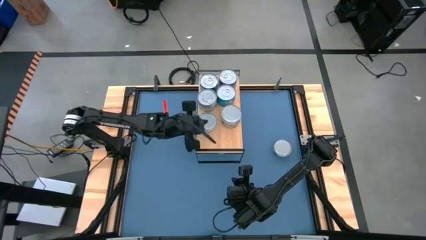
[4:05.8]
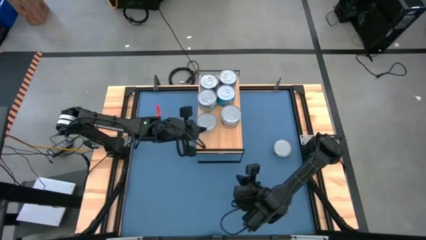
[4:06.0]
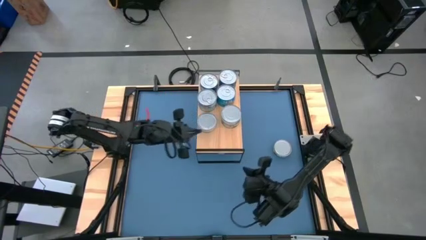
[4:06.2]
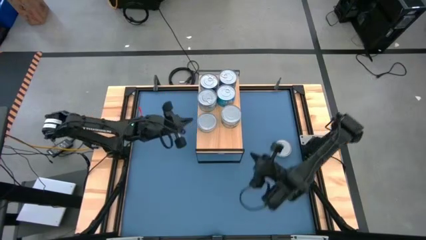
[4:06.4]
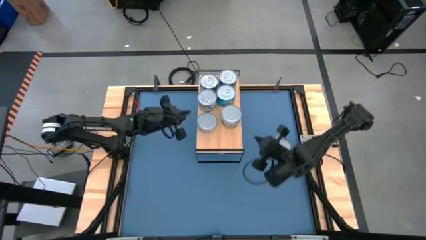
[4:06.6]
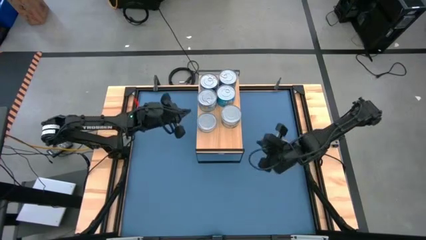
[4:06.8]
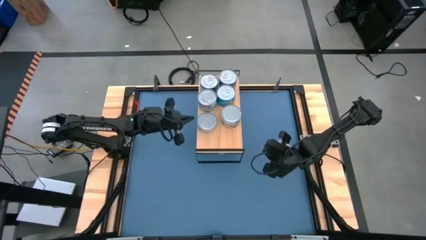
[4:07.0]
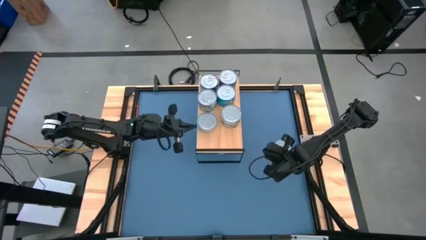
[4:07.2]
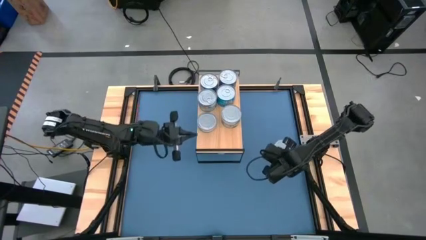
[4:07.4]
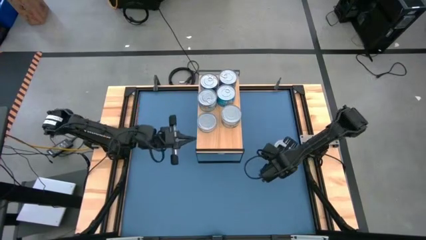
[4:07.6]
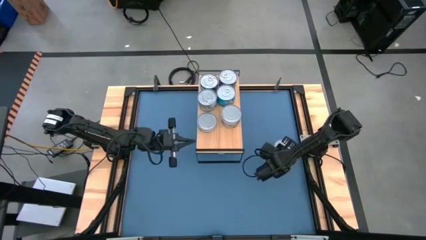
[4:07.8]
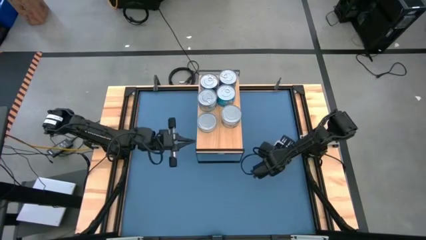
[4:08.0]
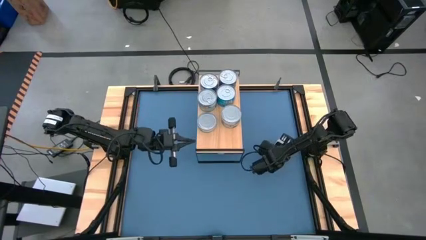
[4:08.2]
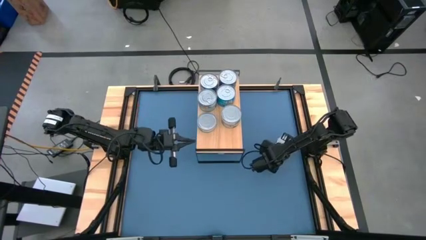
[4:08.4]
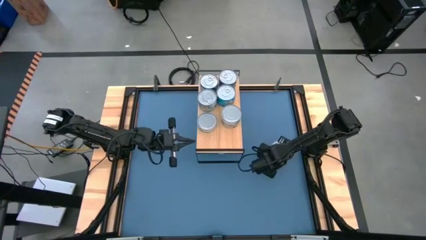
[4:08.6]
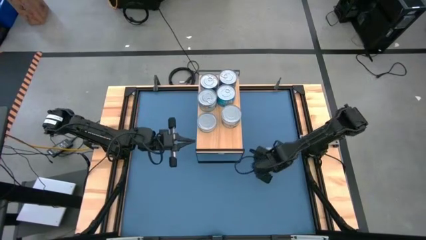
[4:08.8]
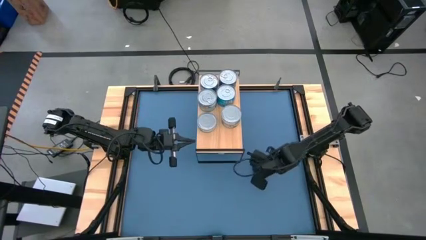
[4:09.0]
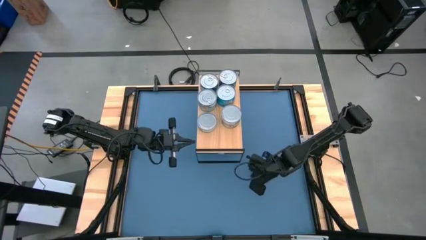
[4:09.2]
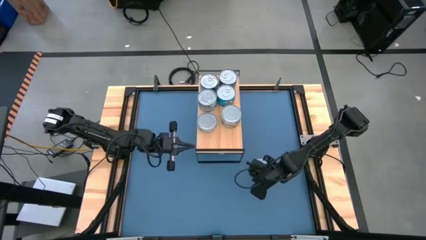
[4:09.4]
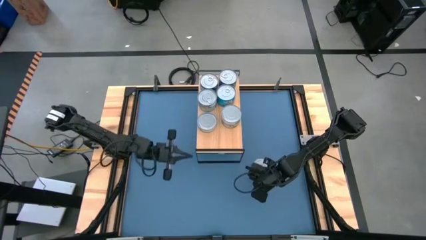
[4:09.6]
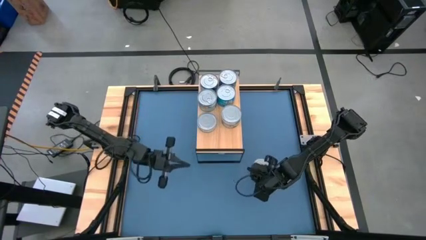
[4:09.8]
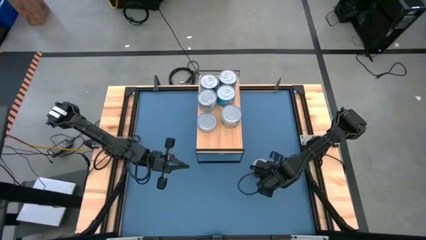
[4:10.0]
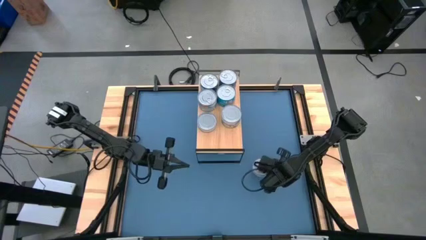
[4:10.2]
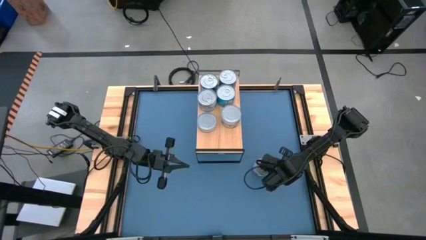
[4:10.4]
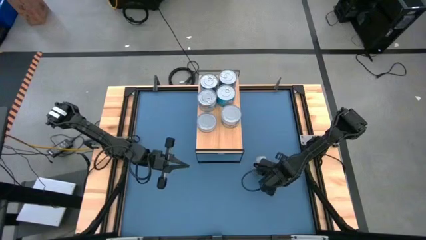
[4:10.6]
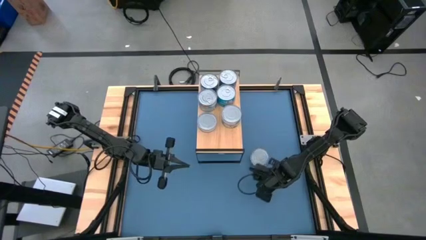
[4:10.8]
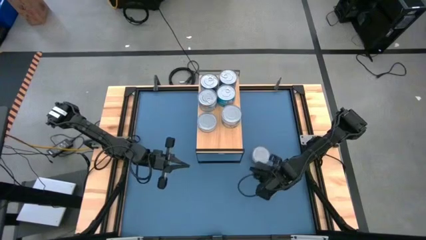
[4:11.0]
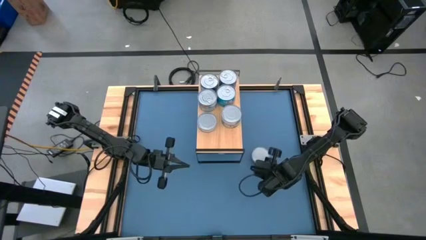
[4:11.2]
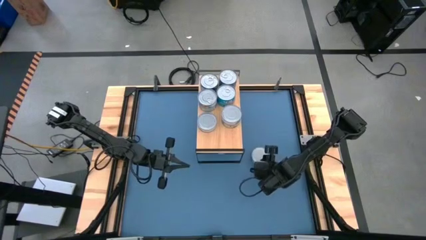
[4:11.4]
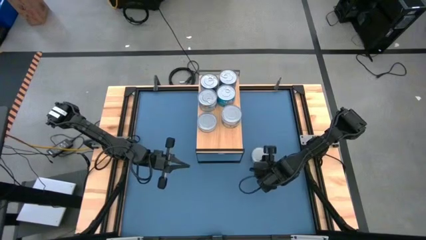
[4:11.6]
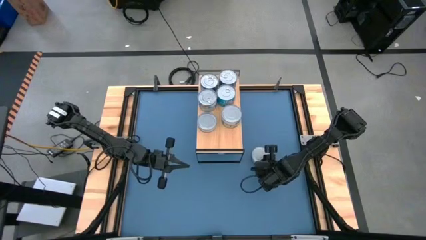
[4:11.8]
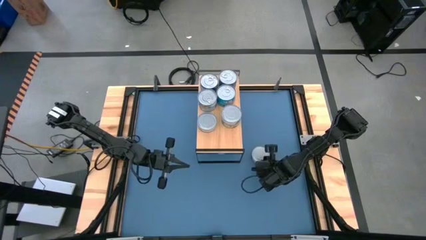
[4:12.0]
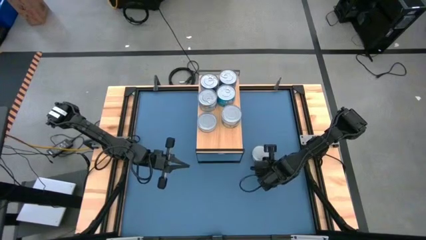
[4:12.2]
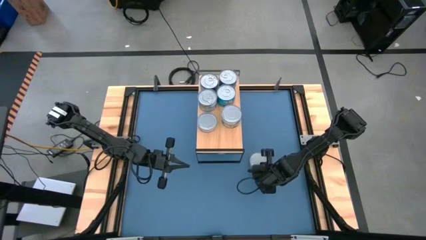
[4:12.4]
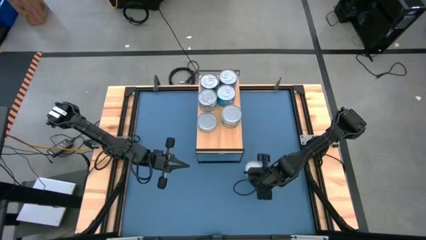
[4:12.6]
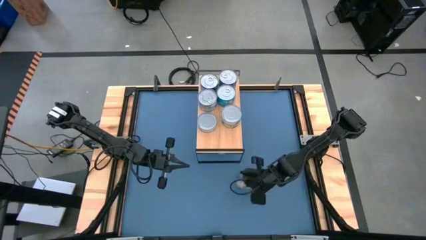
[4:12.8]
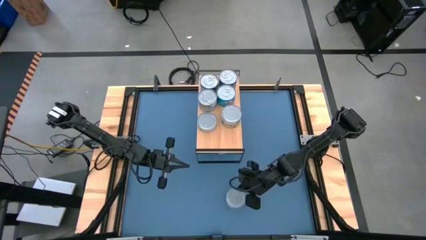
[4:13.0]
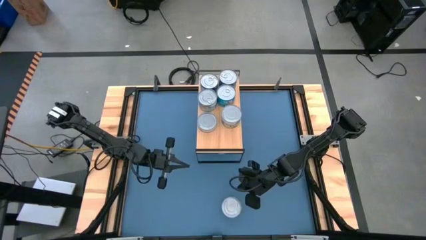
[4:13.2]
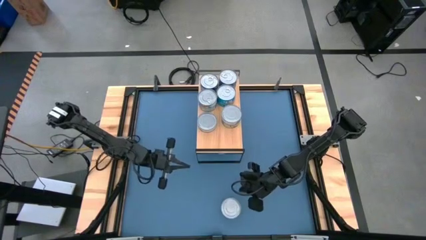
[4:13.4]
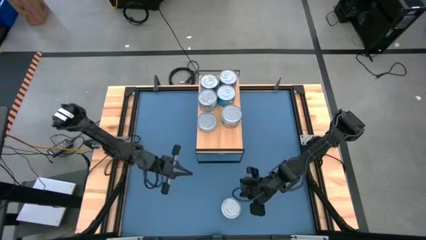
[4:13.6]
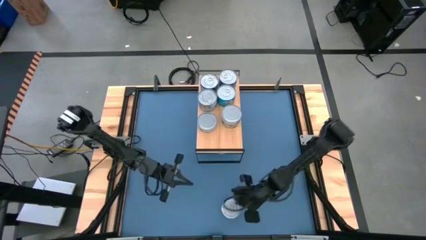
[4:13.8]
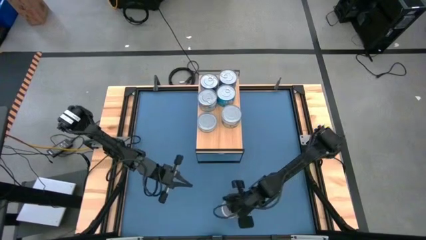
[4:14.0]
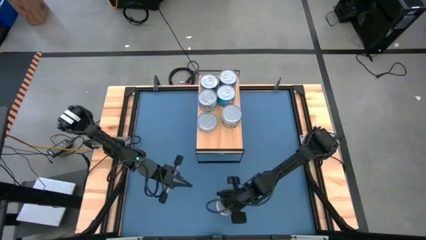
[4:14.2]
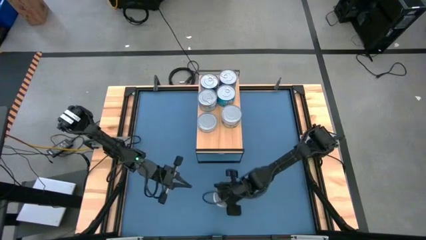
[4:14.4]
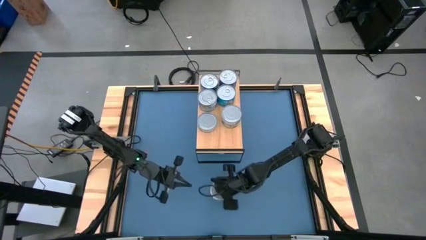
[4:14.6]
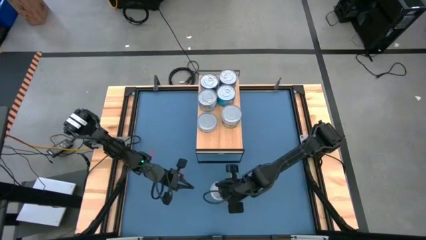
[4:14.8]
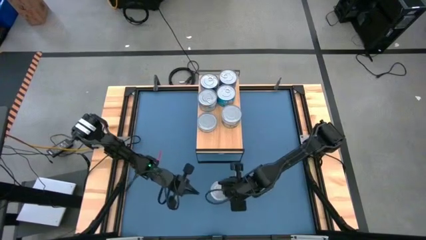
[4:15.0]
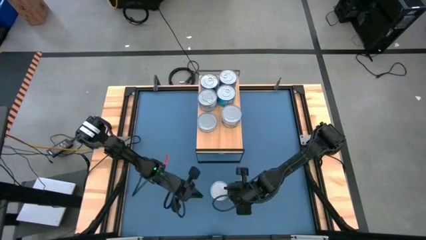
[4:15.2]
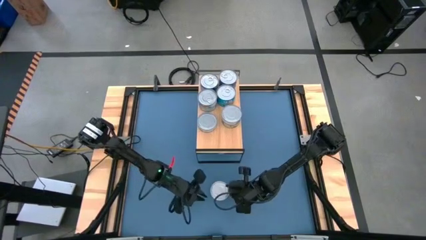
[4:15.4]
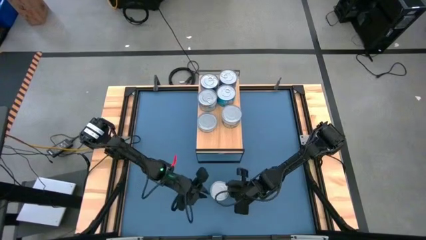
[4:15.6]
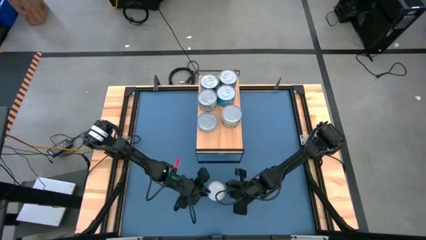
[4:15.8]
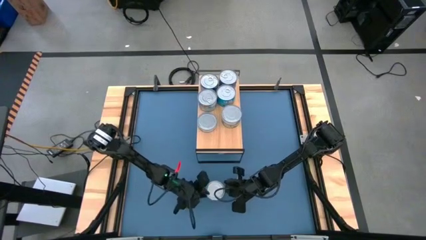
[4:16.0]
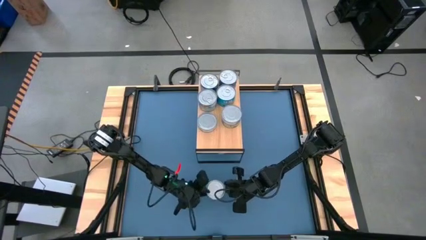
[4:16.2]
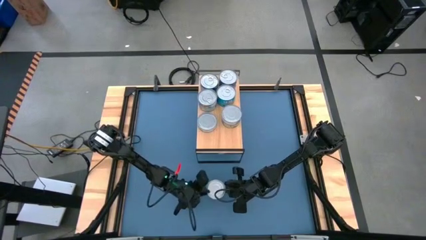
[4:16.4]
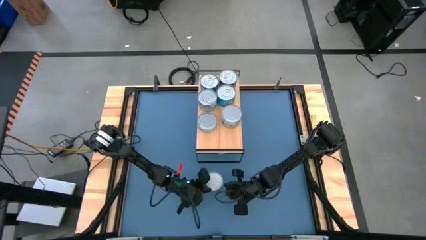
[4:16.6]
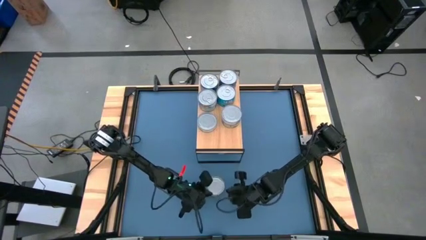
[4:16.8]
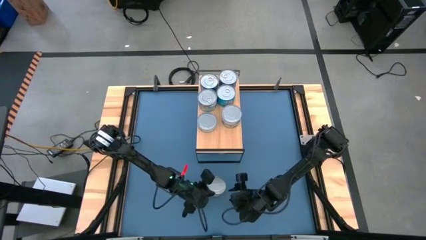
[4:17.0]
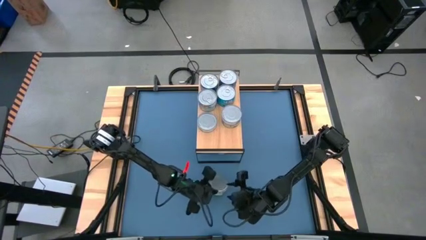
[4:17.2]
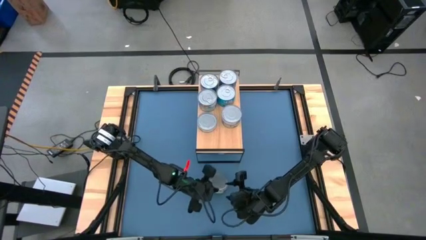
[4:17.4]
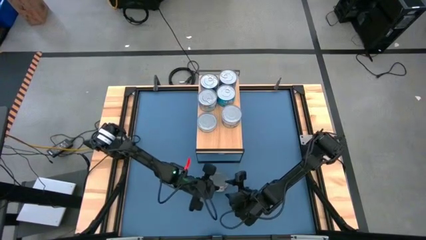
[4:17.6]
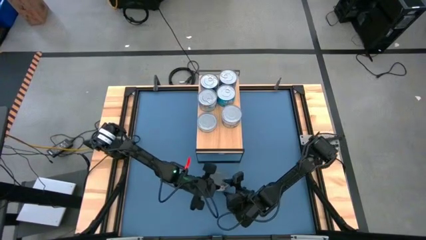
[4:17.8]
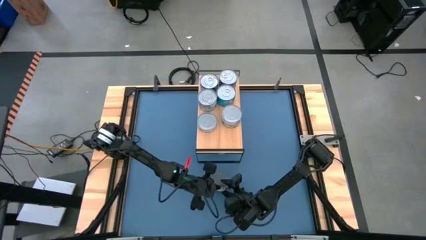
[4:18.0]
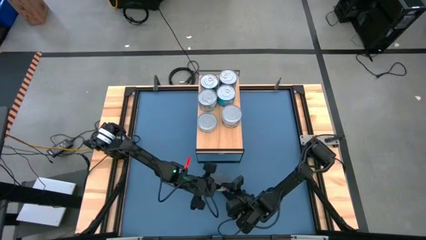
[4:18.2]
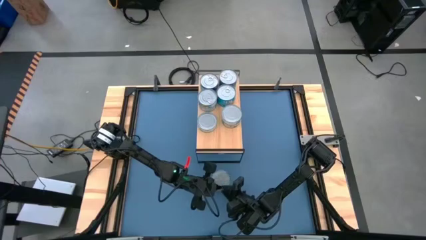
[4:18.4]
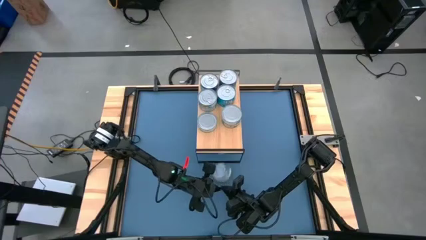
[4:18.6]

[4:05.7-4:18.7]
Task: Stack canned seafood by type on shelf
Stack the green tuna can on top of the other green tuna can on the shelf

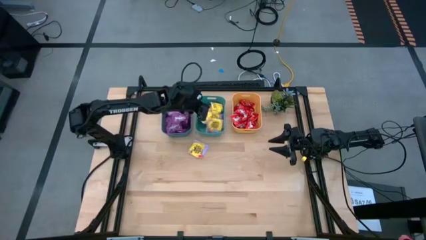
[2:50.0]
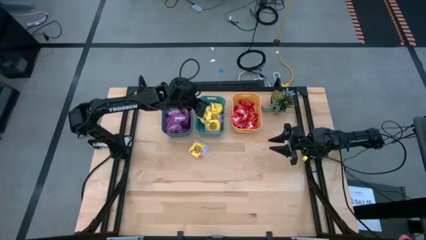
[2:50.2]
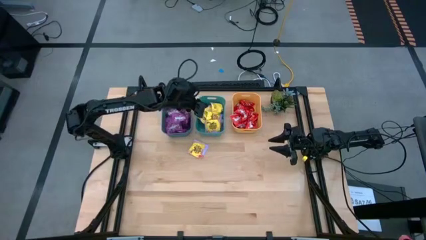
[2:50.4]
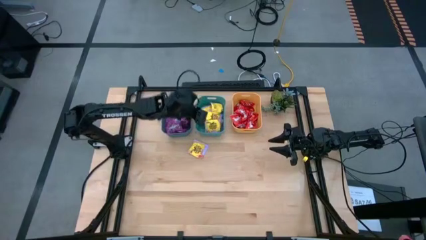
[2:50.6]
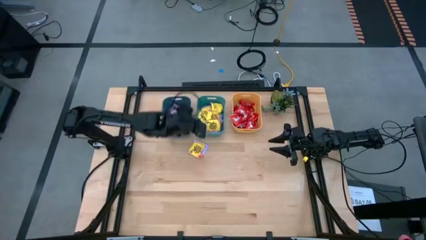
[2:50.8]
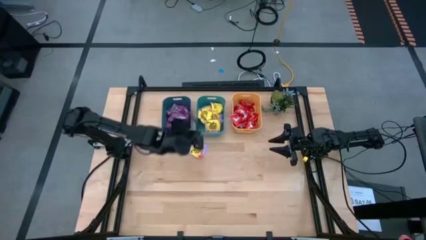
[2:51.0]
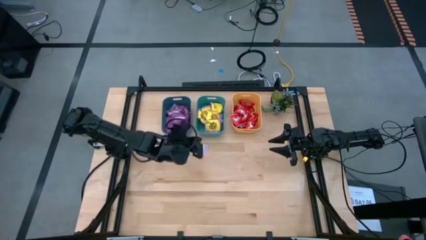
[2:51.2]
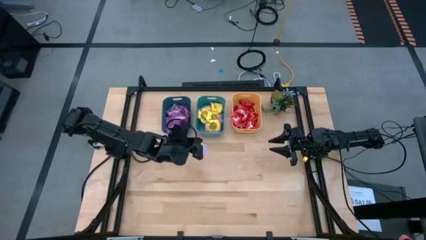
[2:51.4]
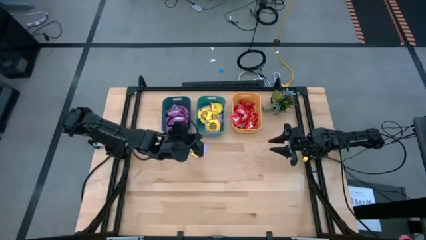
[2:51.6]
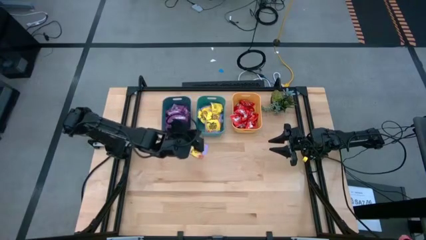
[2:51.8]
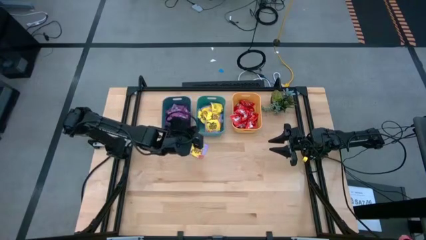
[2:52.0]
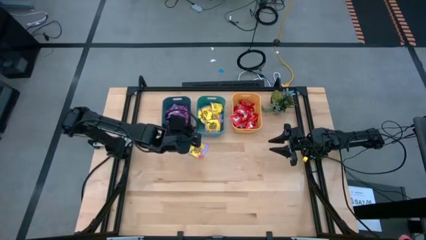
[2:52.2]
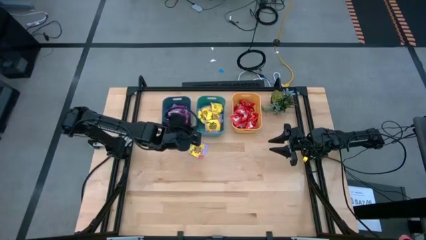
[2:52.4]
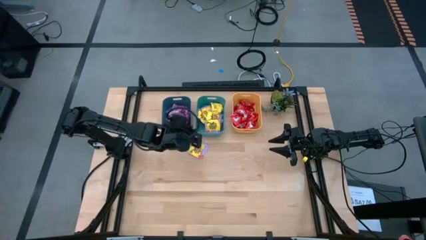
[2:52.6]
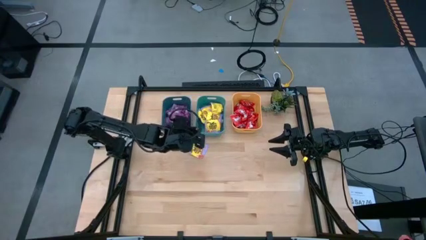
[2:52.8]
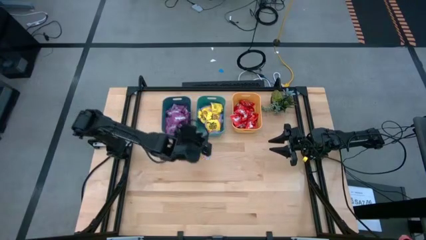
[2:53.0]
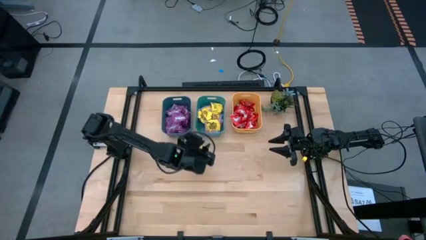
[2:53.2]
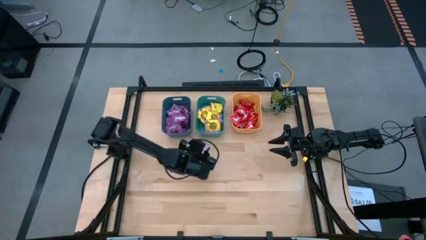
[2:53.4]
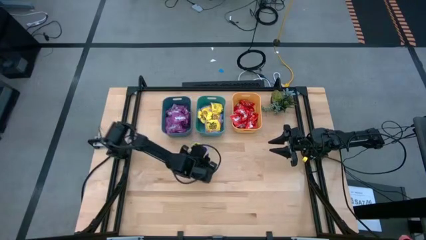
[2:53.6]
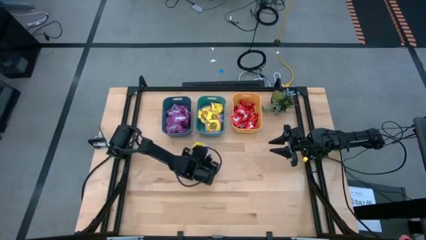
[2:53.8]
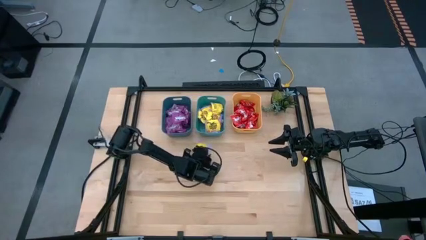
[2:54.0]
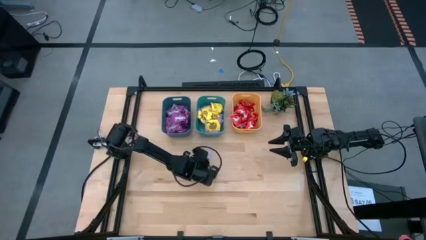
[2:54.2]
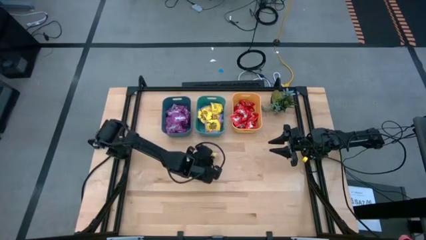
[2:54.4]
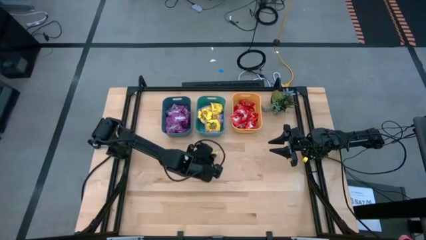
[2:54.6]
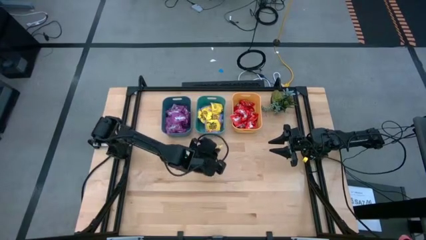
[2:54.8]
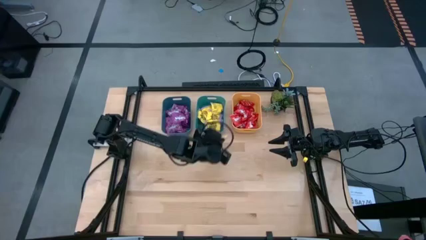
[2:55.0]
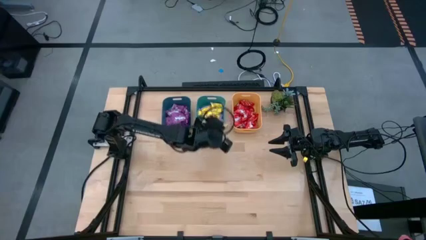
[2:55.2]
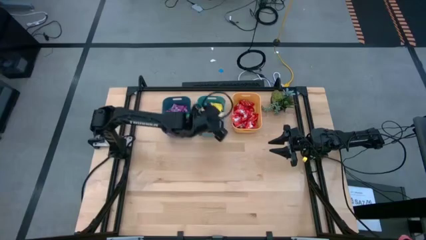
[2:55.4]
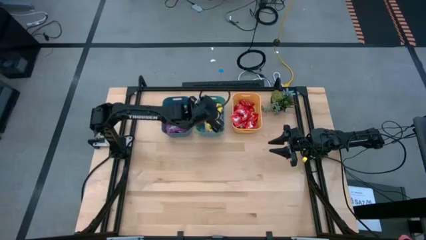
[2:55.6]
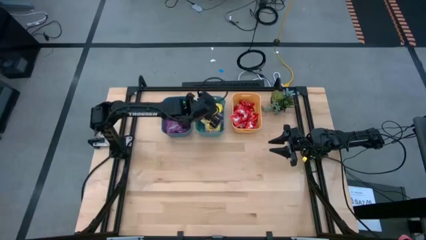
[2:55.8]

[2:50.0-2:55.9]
Task: Sort candy
Put the yellow candy into the green bin
